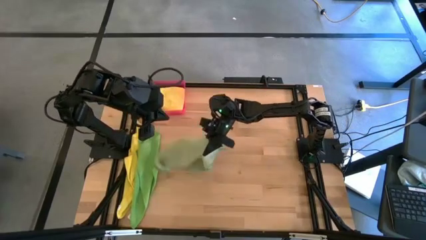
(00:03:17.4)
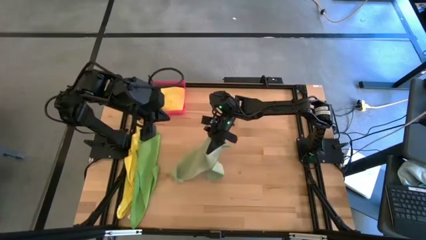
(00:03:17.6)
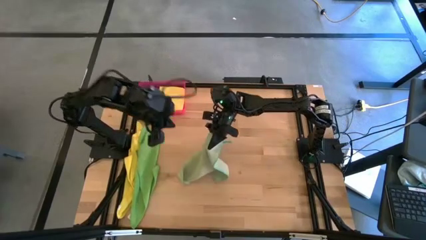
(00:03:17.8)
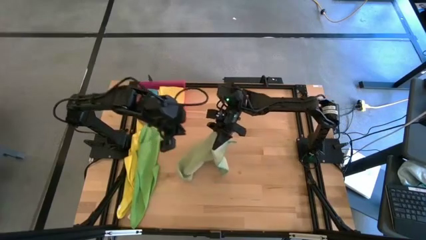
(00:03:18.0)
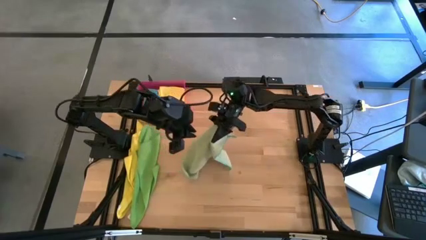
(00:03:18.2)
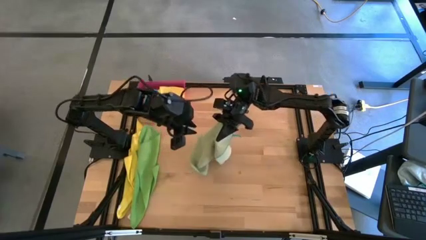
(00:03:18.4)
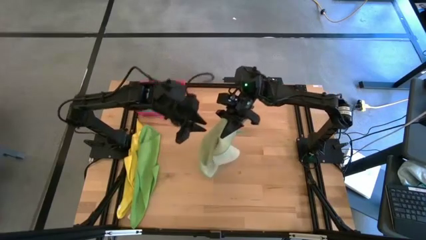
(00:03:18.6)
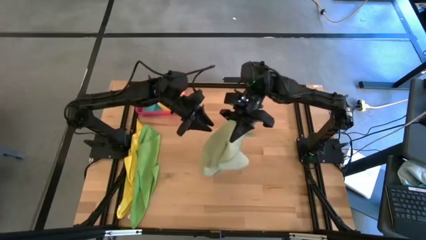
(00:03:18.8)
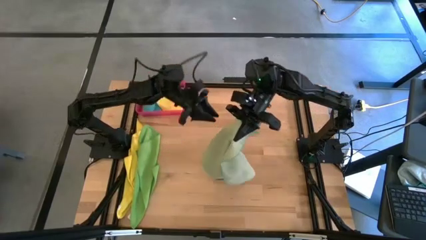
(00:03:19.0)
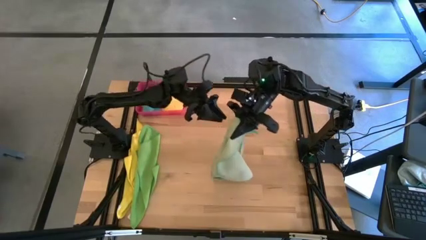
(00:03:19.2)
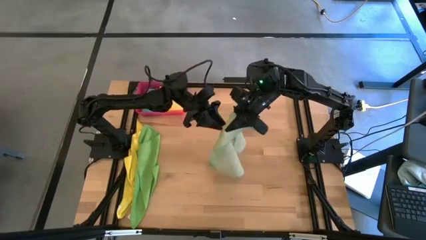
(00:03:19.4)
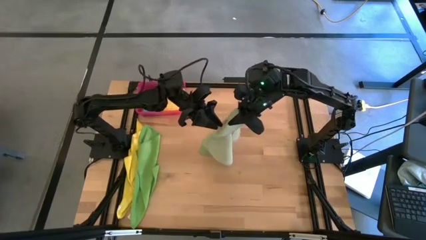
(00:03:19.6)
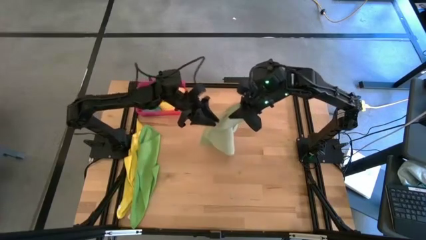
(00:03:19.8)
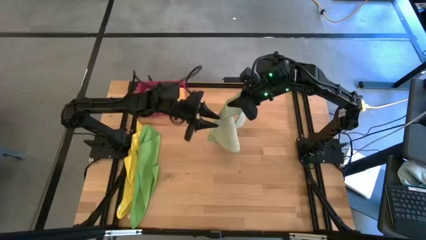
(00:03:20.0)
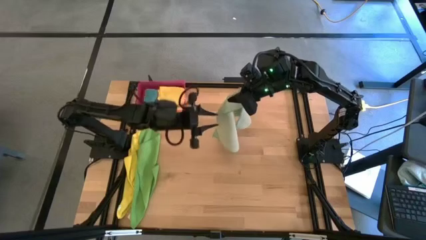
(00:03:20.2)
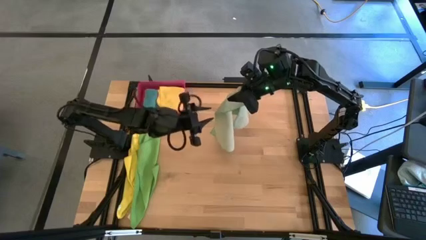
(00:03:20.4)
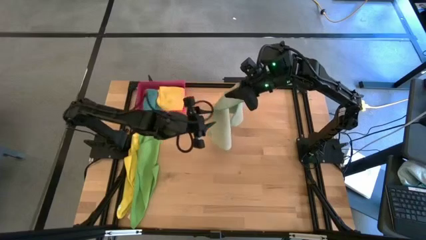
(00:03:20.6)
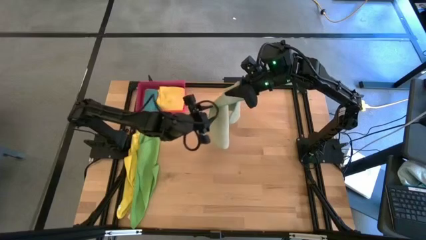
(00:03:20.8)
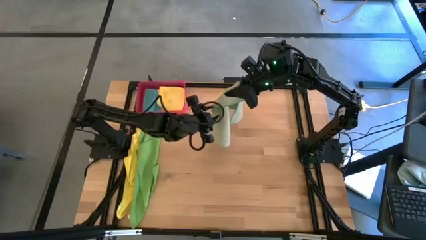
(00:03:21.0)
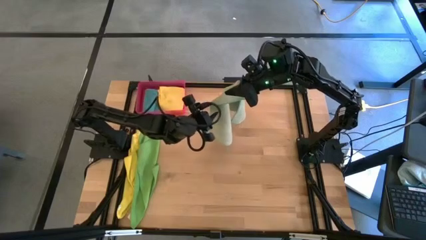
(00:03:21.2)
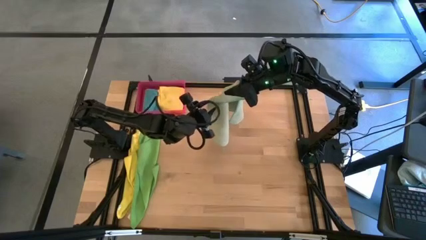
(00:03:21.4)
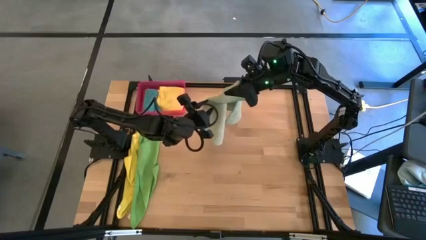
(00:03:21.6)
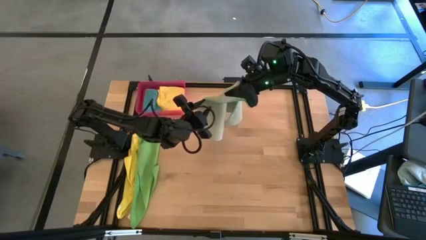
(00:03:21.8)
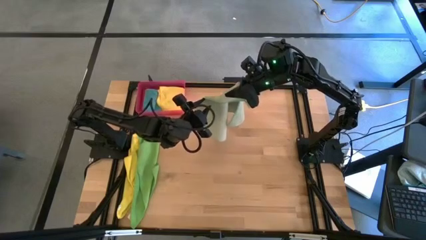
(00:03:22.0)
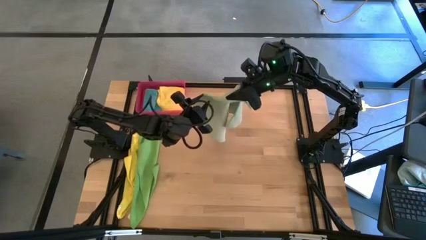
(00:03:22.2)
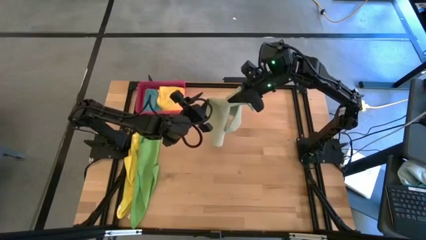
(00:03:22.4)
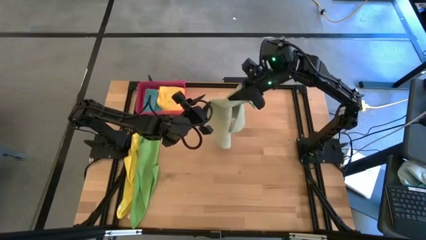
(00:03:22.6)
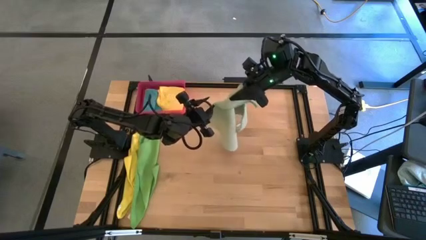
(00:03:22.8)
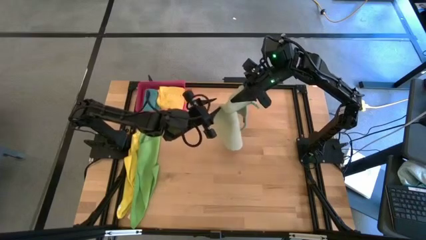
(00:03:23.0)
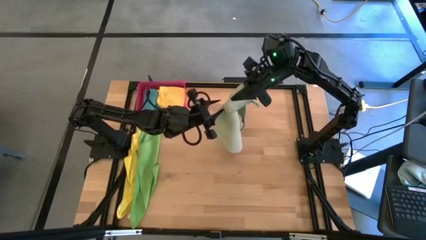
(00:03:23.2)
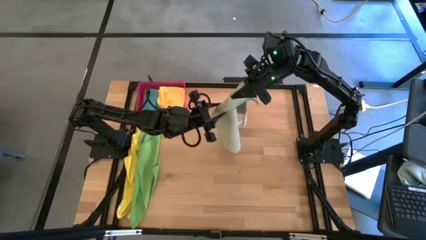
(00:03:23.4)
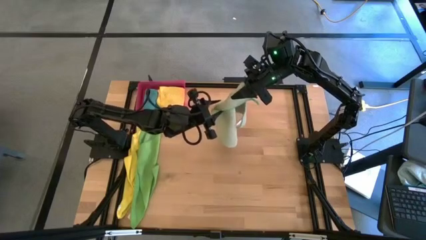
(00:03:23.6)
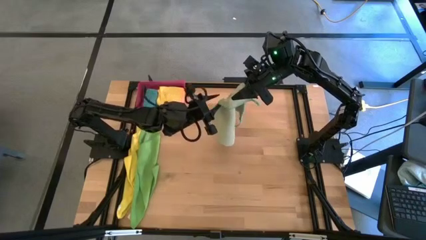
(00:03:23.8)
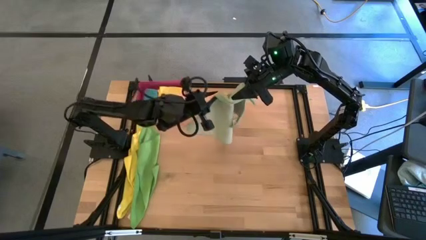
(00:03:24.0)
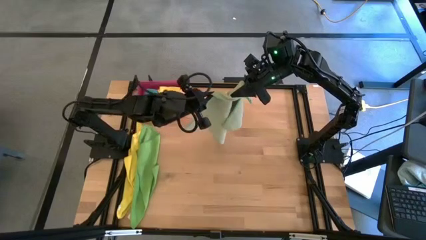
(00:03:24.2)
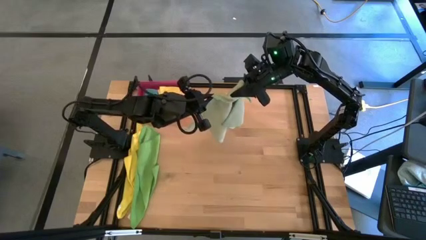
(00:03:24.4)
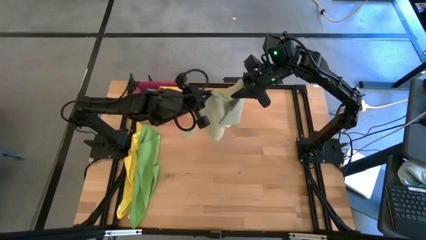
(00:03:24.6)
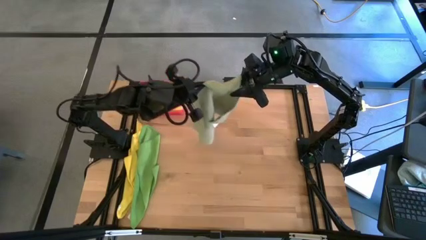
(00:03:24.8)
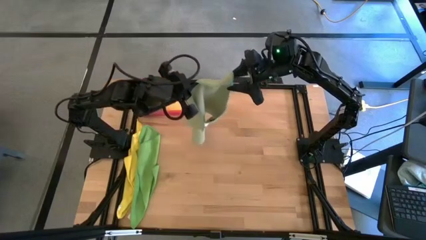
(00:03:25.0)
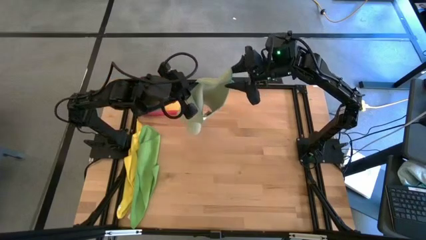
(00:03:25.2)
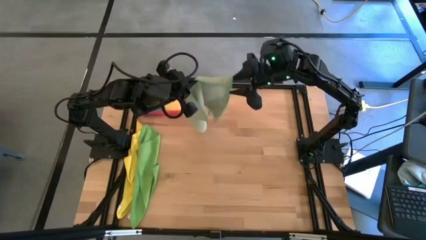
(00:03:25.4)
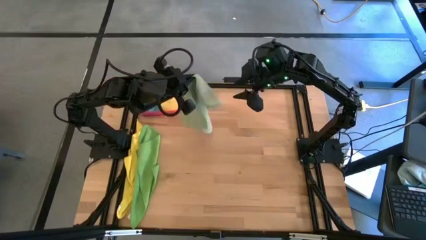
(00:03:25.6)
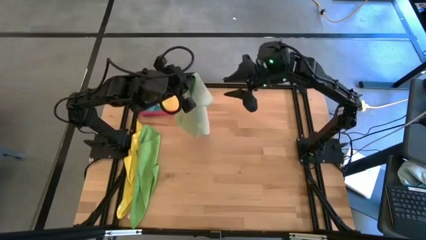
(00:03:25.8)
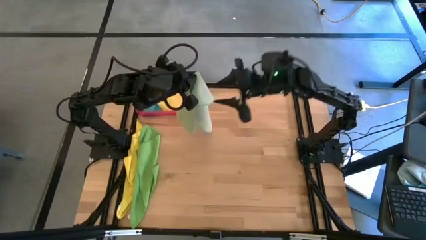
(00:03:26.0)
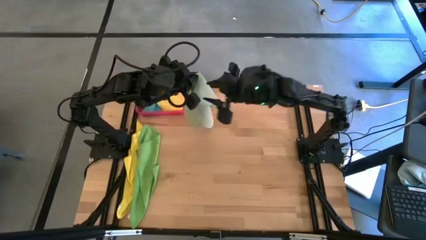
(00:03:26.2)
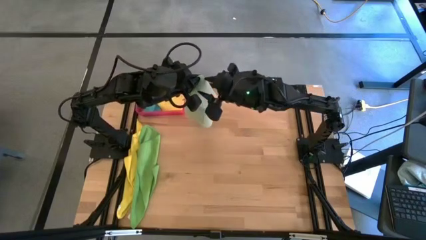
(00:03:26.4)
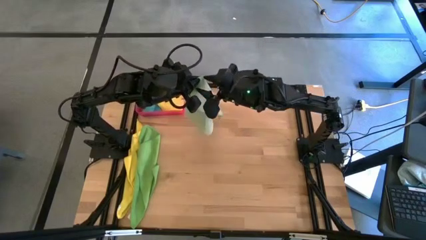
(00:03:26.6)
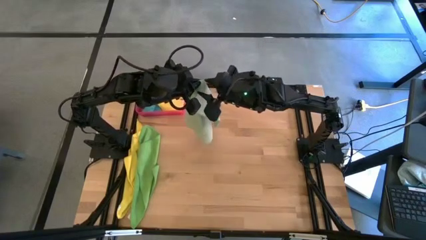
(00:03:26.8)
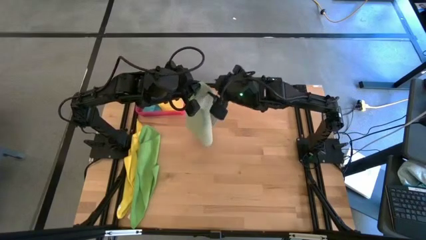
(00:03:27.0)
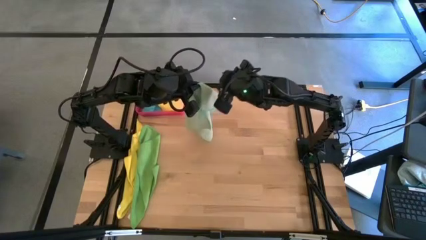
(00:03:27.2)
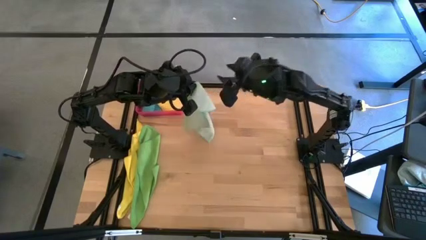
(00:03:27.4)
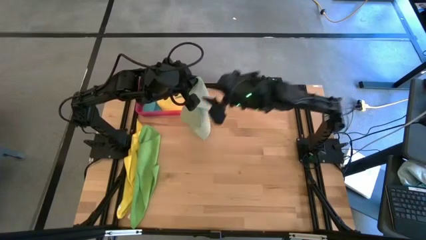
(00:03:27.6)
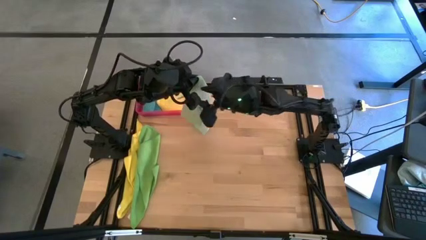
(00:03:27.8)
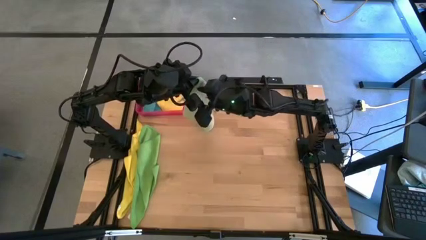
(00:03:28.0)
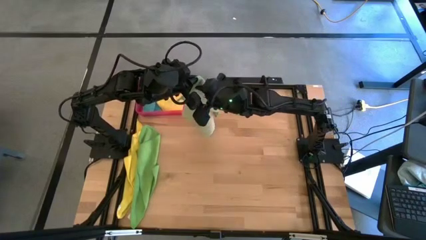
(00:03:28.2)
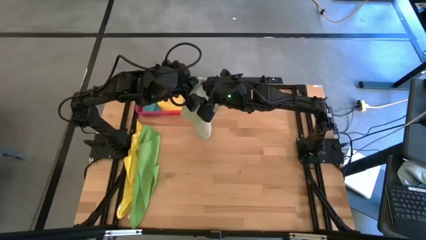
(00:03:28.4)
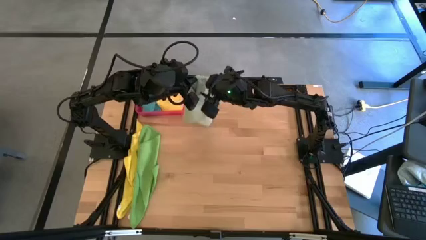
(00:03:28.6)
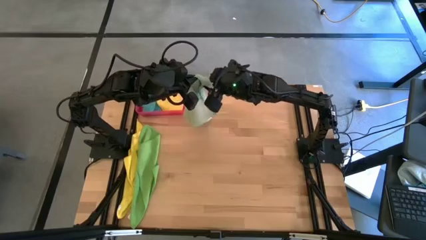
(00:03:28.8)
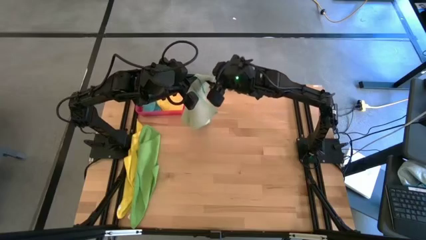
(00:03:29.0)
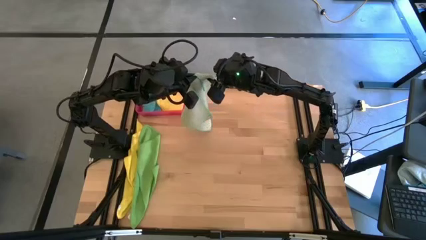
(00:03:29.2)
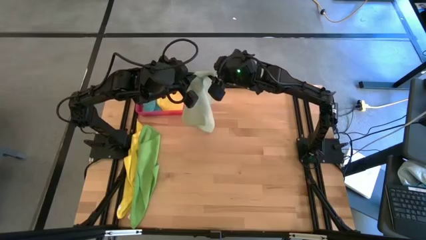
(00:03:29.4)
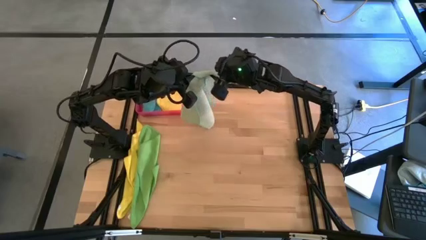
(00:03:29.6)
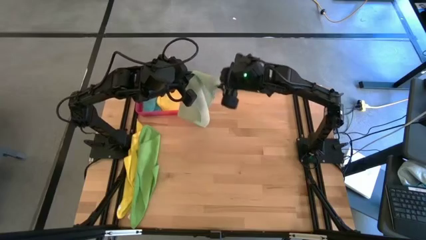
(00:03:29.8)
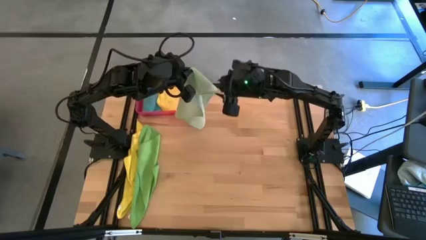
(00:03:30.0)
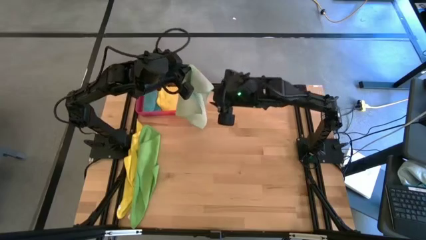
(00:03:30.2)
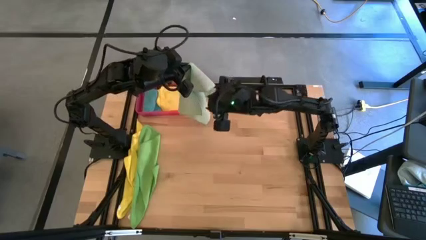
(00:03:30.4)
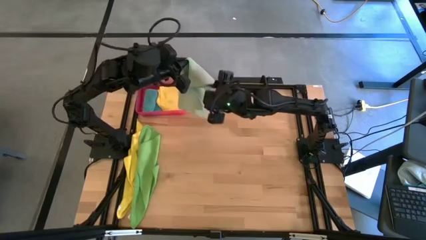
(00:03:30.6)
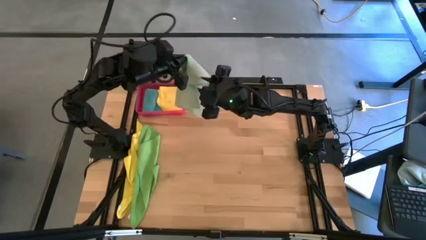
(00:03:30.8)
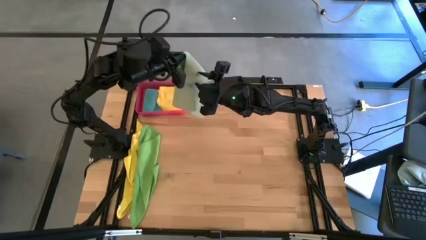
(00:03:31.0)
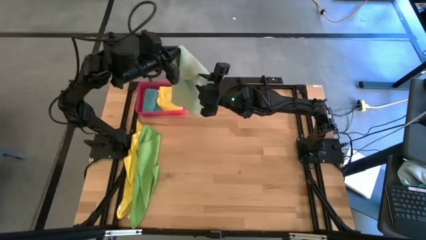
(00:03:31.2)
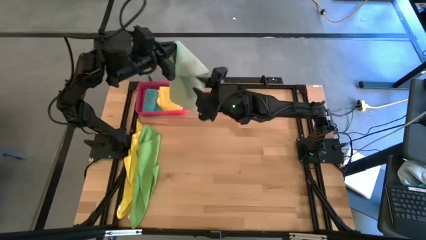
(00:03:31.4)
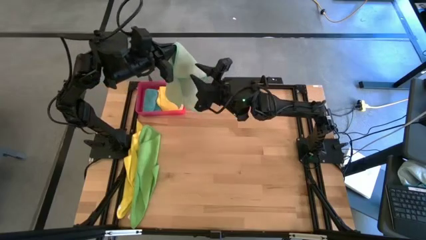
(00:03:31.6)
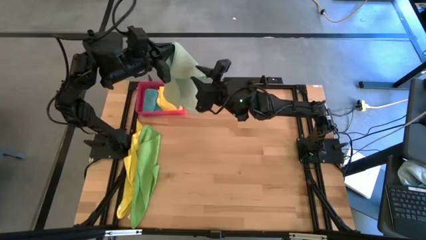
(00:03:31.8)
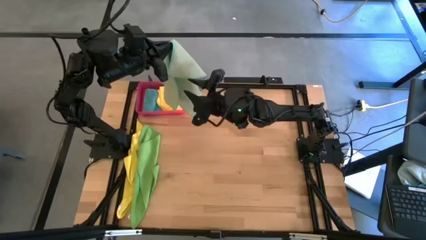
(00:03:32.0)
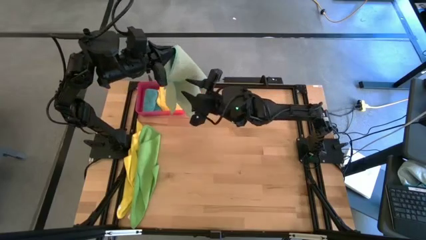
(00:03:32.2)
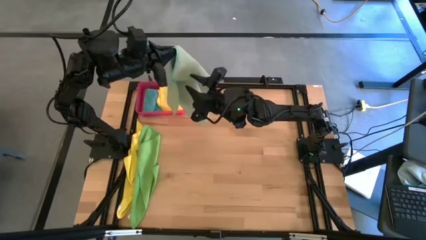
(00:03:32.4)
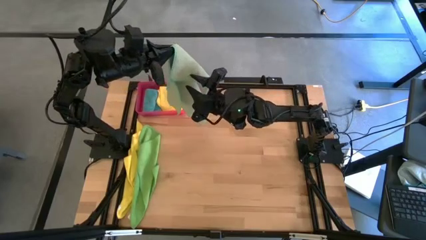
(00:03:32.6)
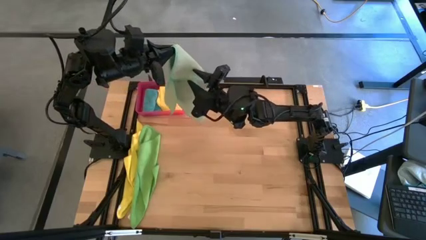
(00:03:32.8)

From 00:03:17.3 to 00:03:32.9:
Task: Fold microfiber towels
Fold the light green microfiber towel
